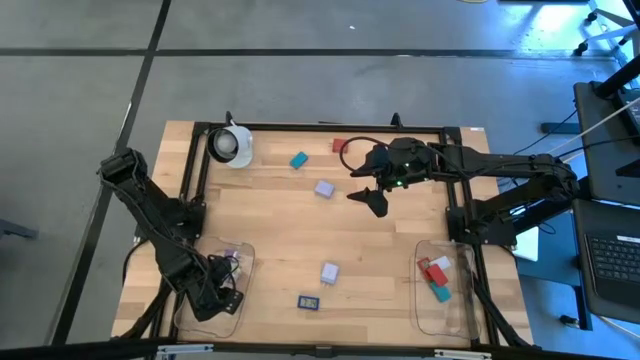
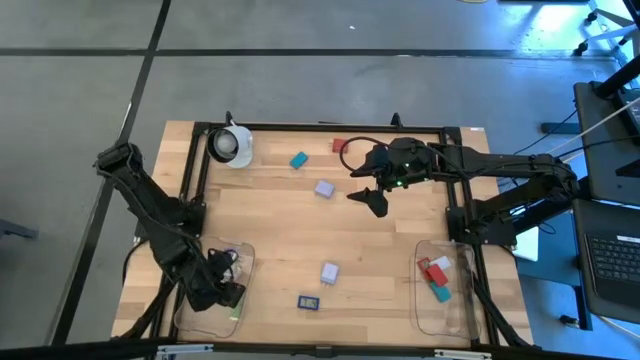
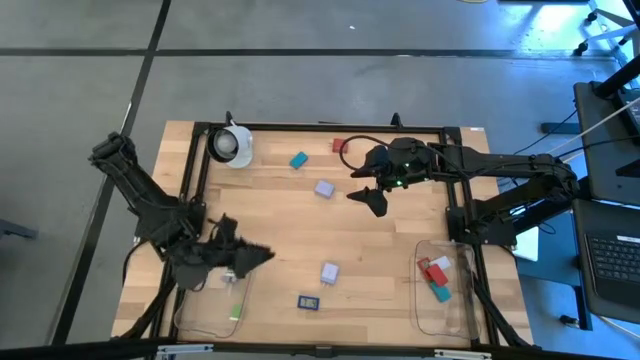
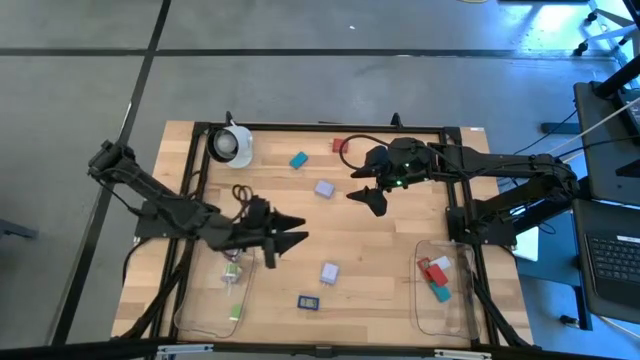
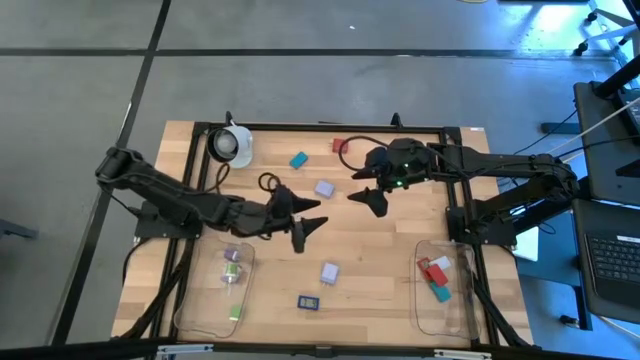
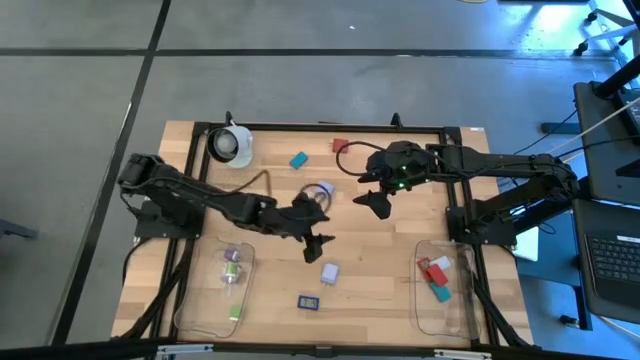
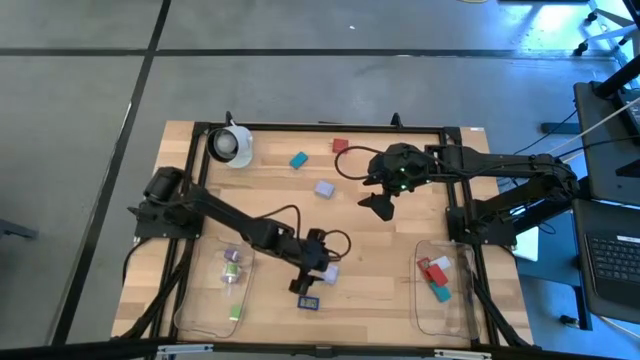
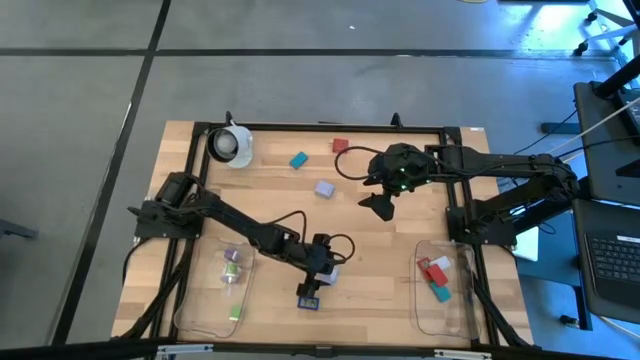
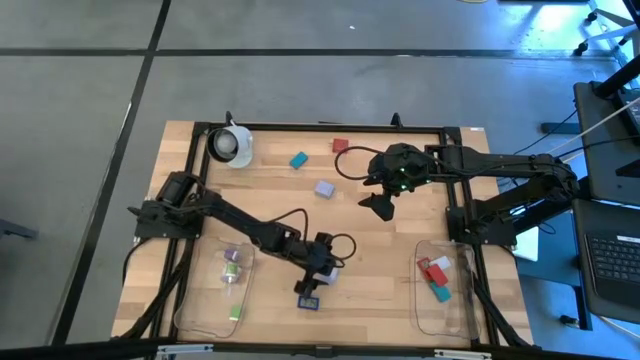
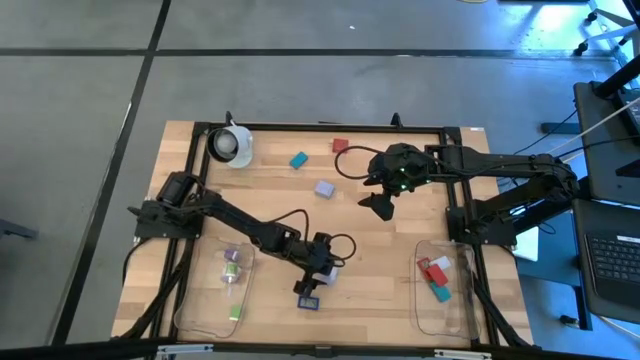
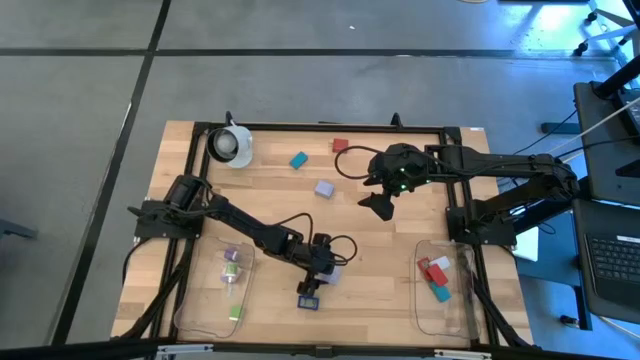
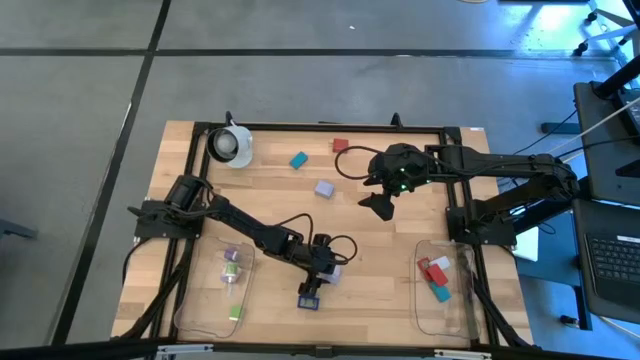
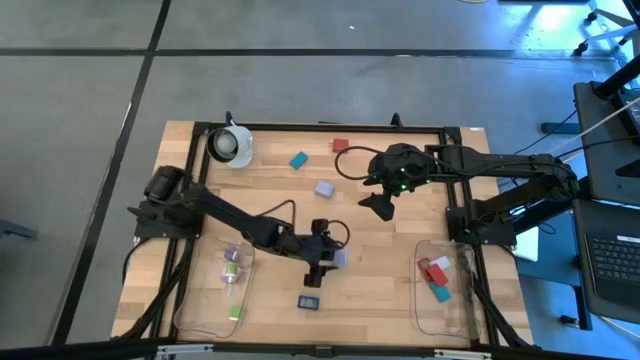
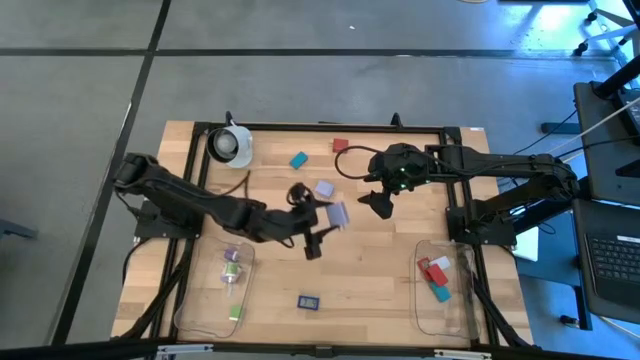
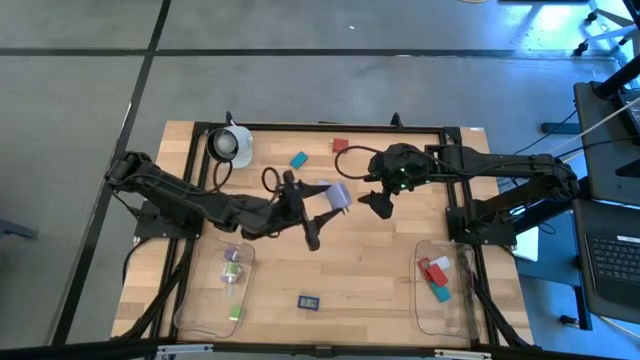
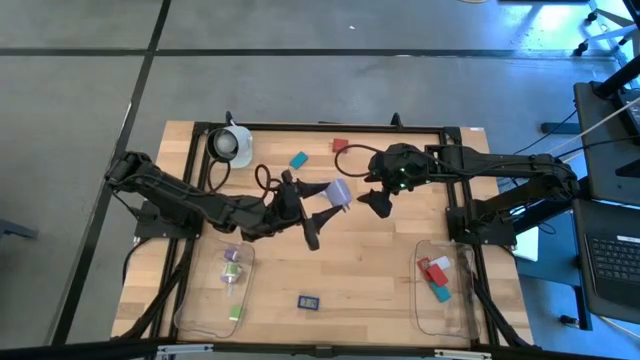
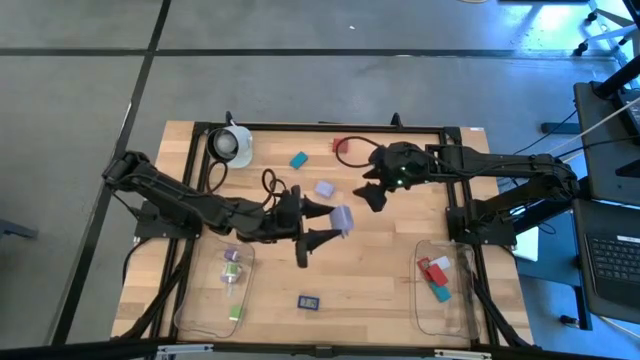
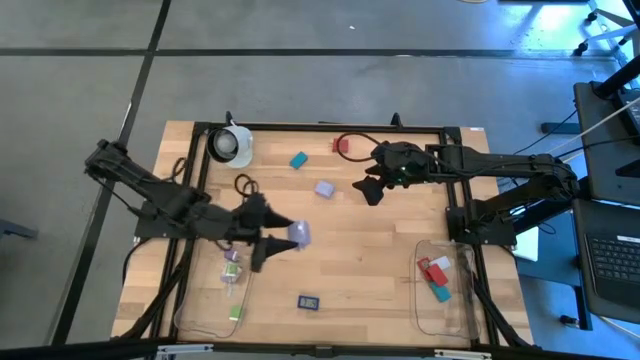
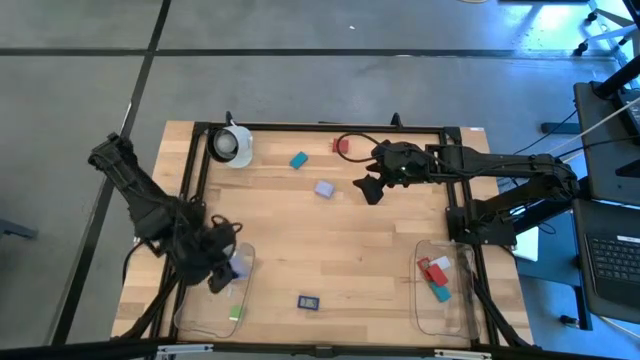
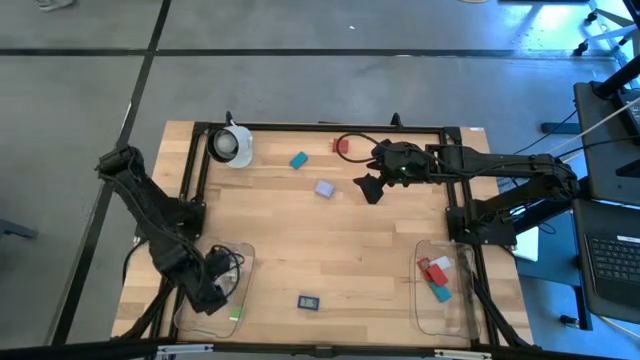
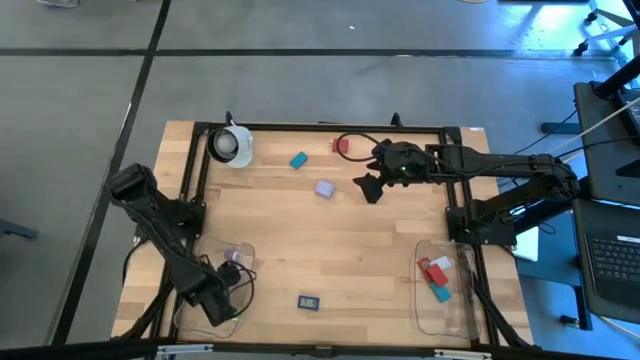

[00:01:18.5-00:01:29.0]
Task: Pick & Place Office items
Put the bottom purple adapter into the left transparent bin

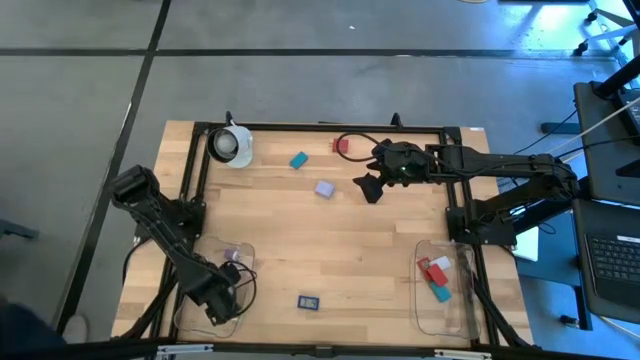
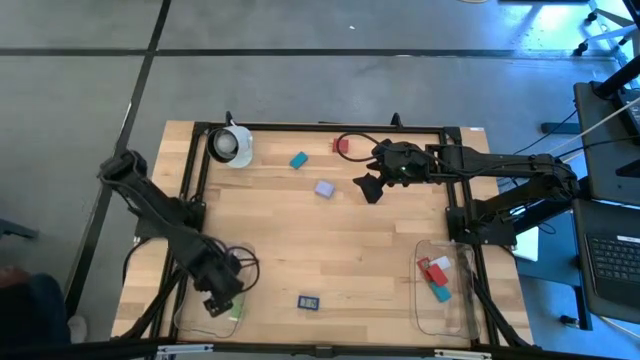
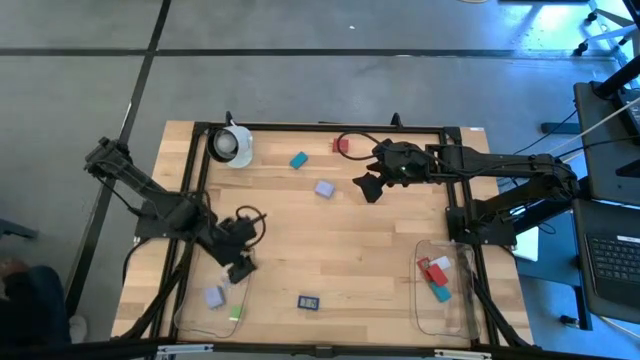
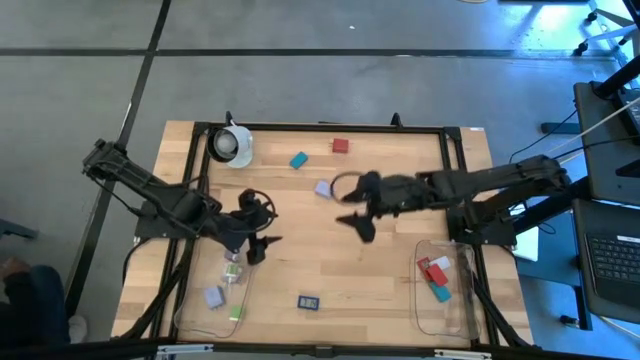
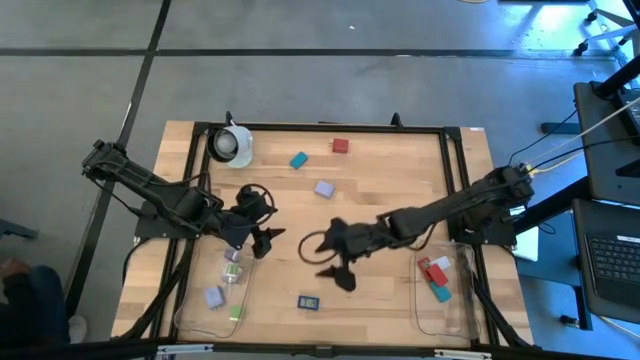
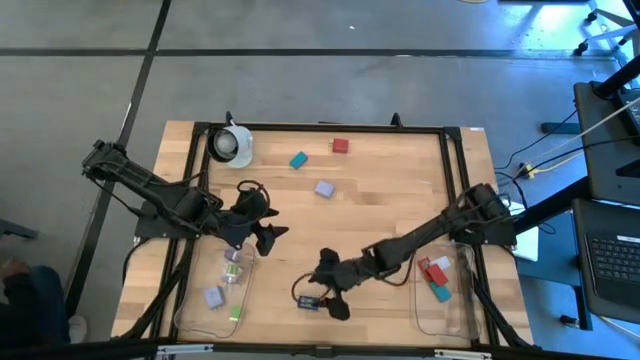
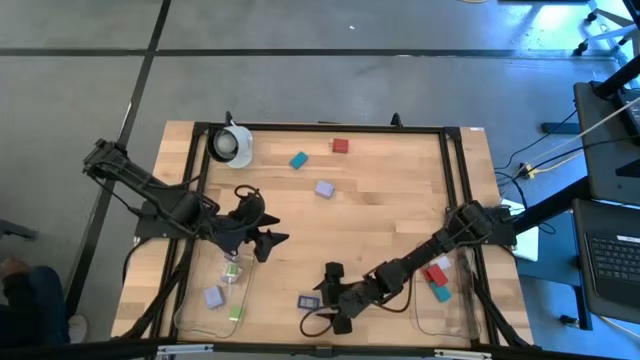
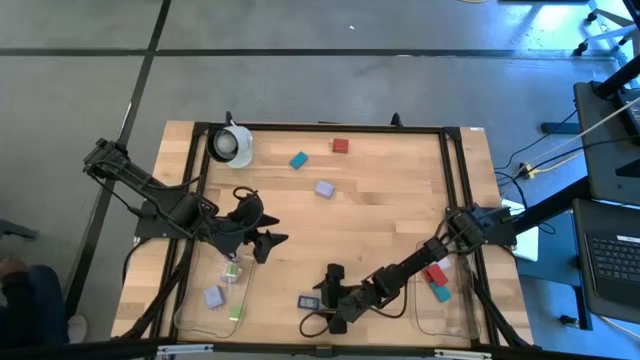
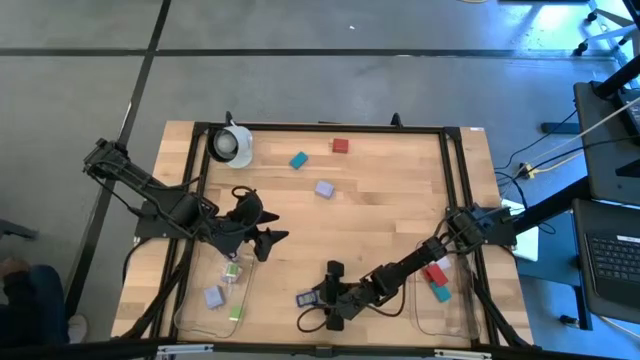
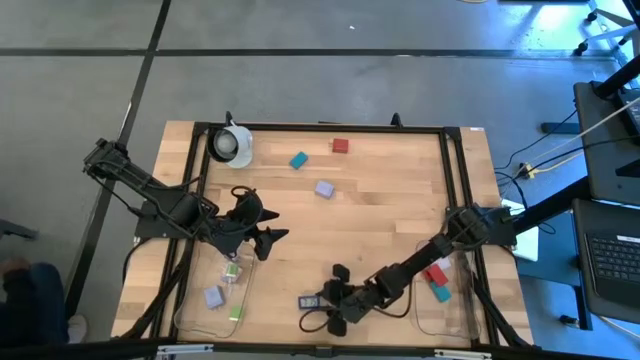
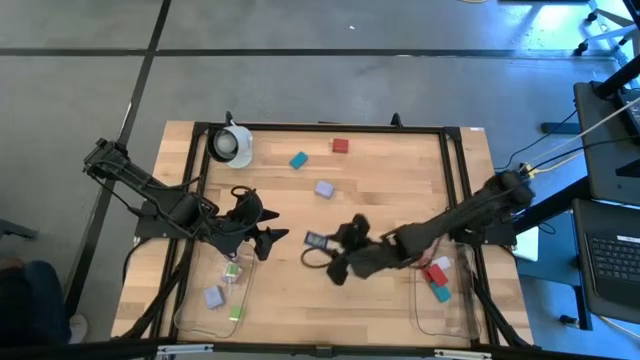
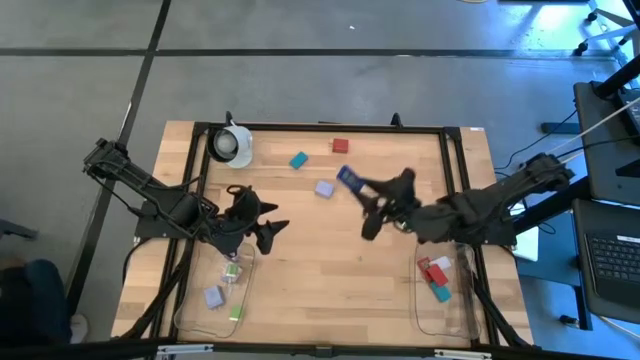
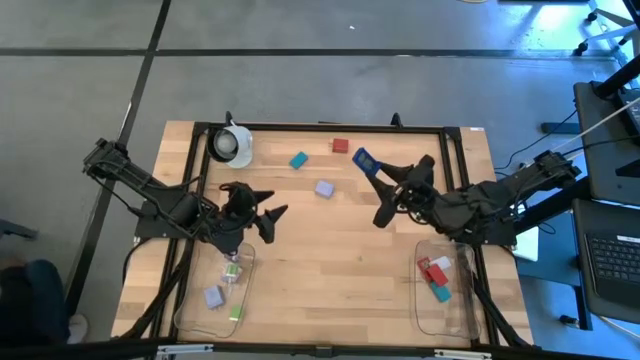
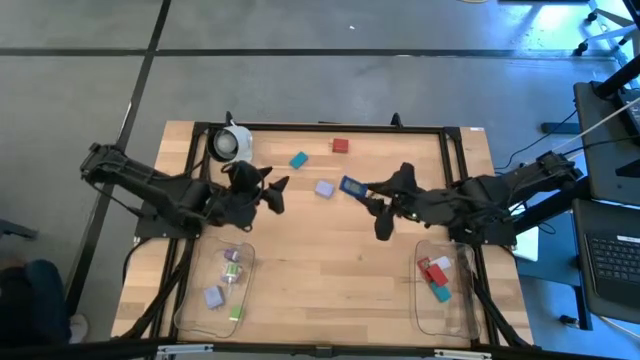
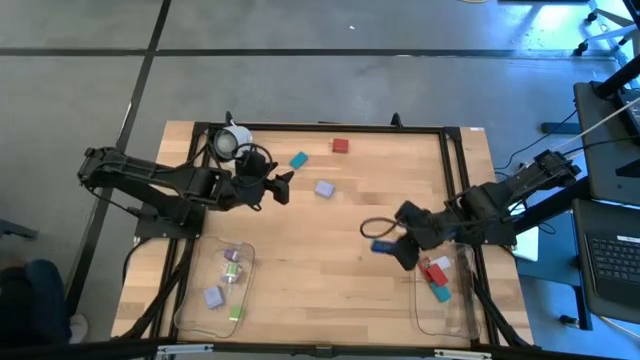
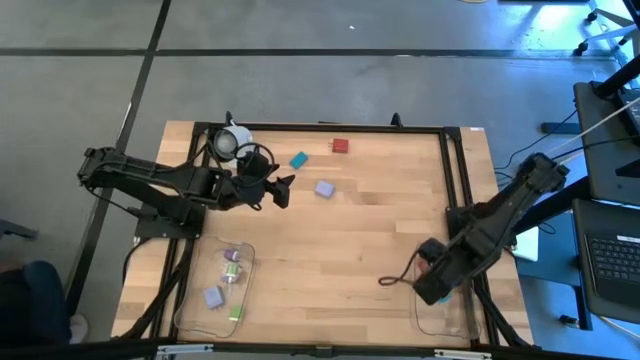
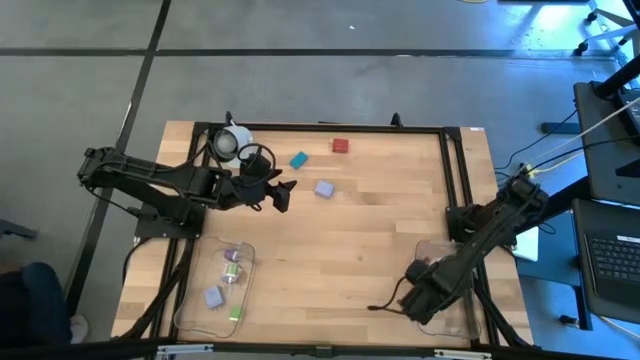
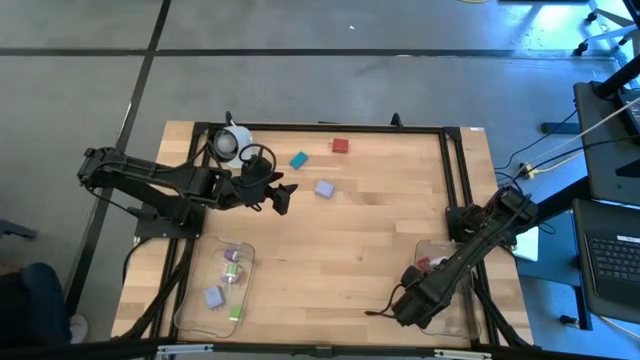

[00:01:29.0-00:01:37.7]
Put the blue timer into the right transparent bin

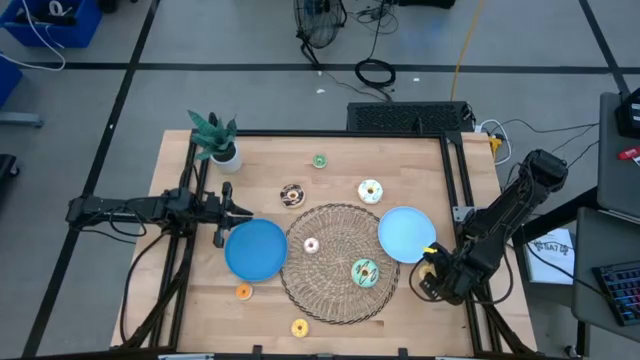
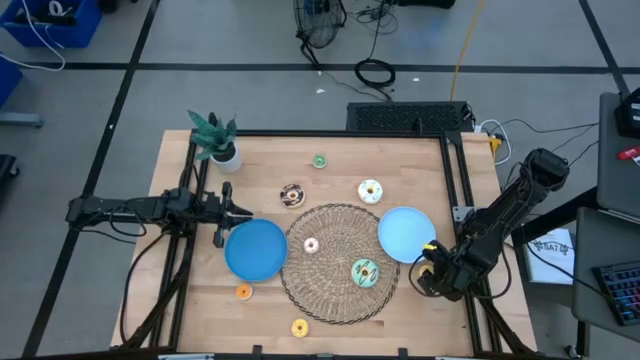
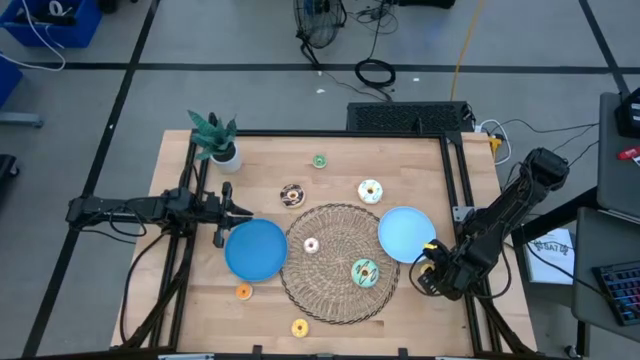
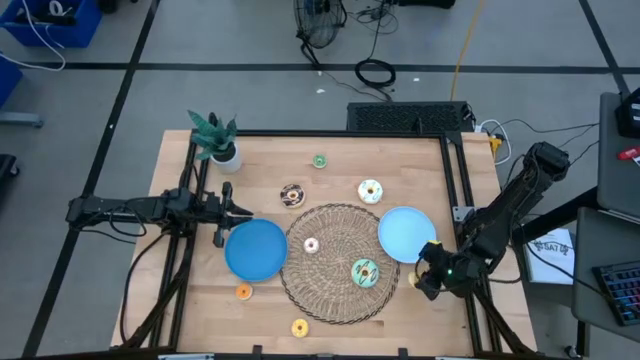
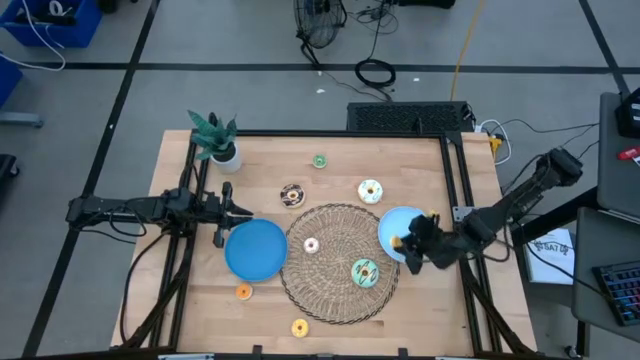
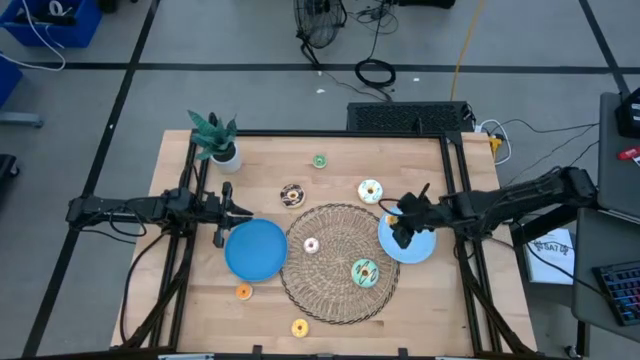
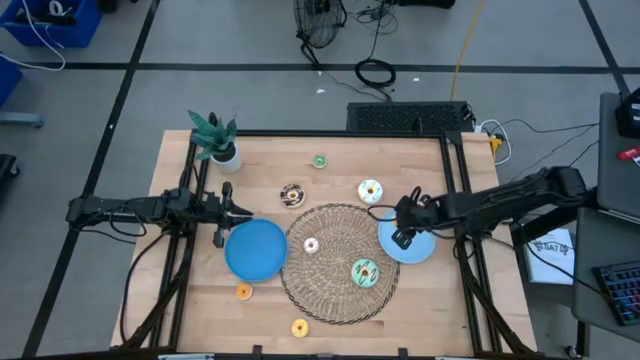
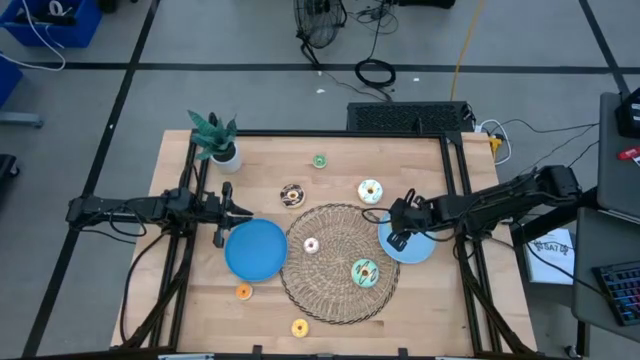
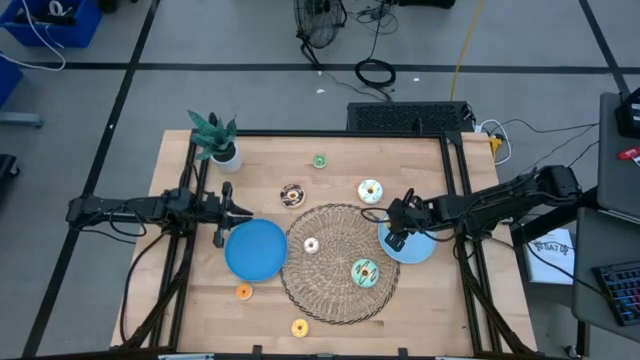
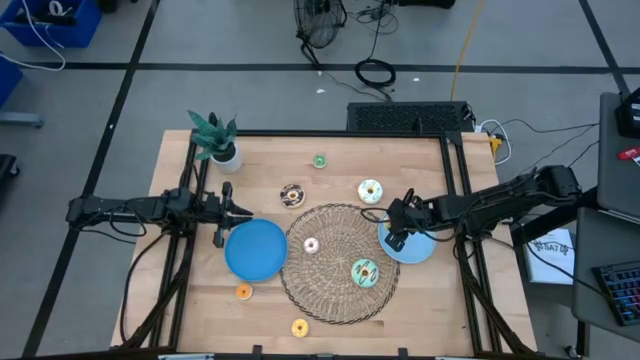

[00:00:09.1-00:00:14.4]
Task: Pick & Place donuts
Put the top small yellow donut on the light blue plate
